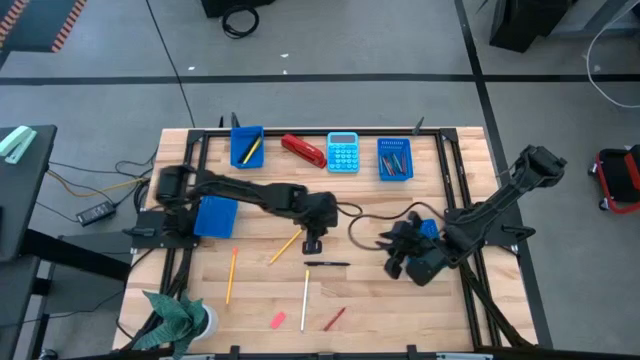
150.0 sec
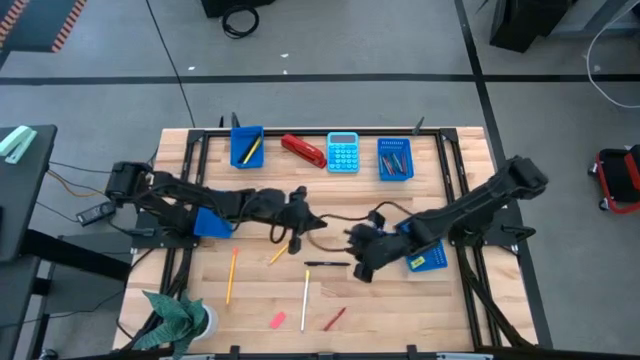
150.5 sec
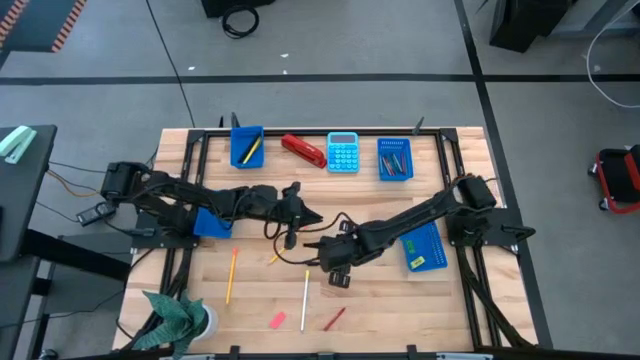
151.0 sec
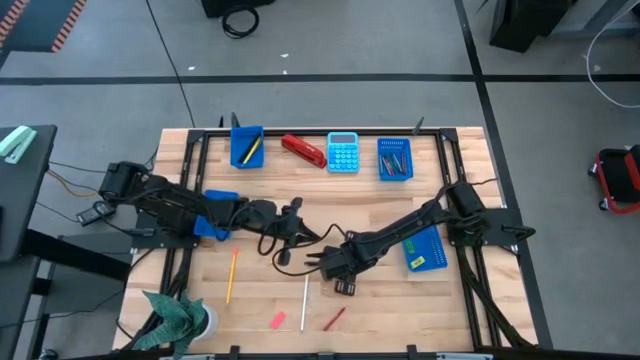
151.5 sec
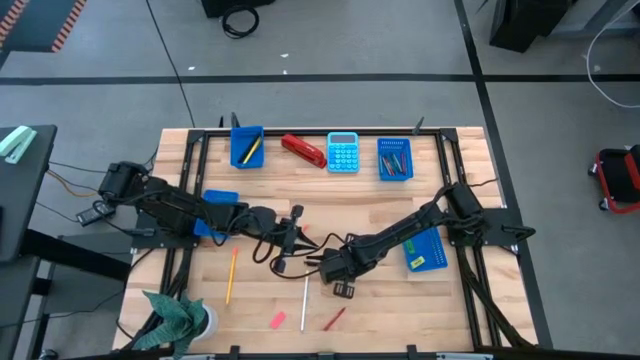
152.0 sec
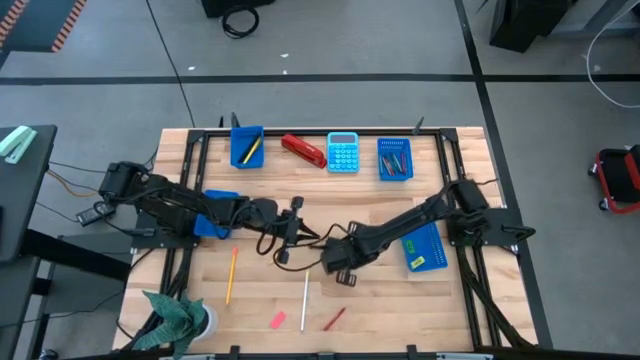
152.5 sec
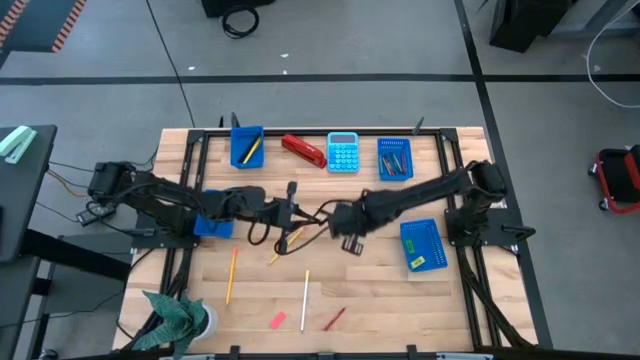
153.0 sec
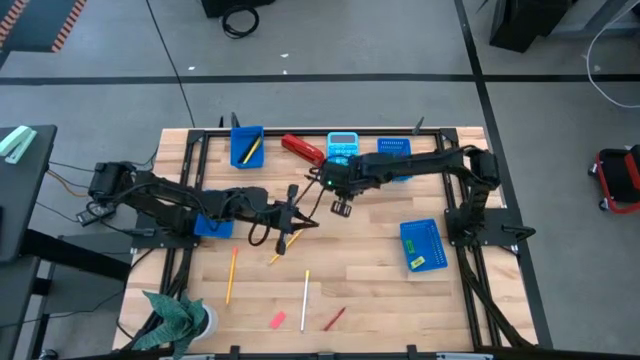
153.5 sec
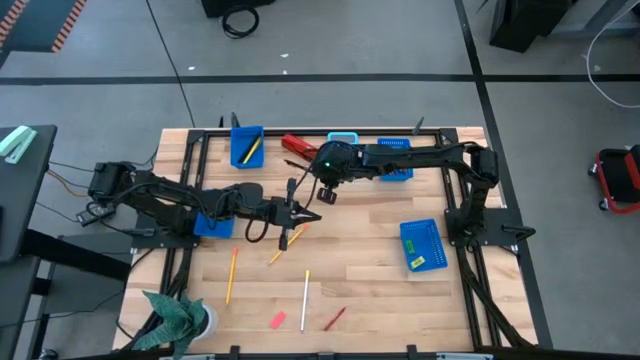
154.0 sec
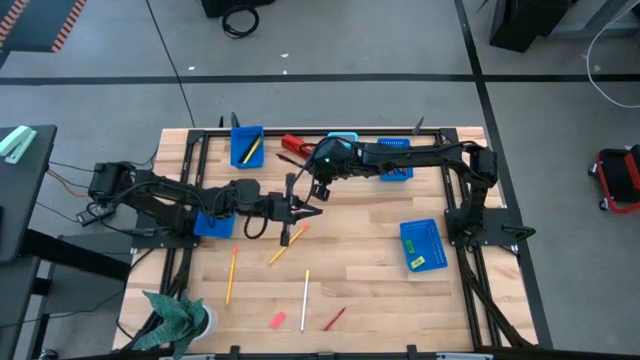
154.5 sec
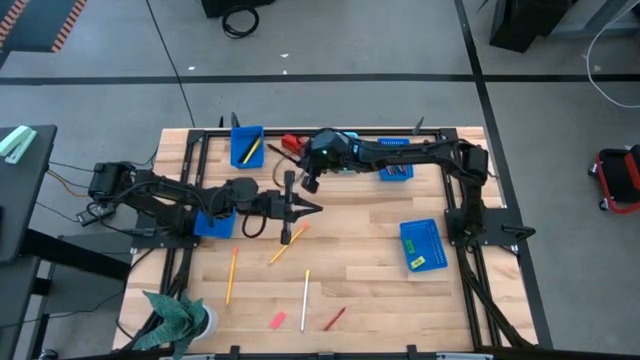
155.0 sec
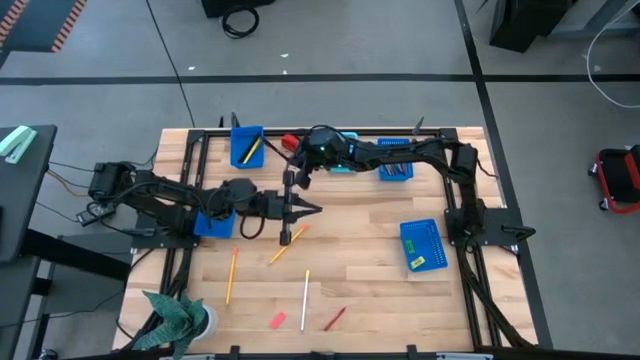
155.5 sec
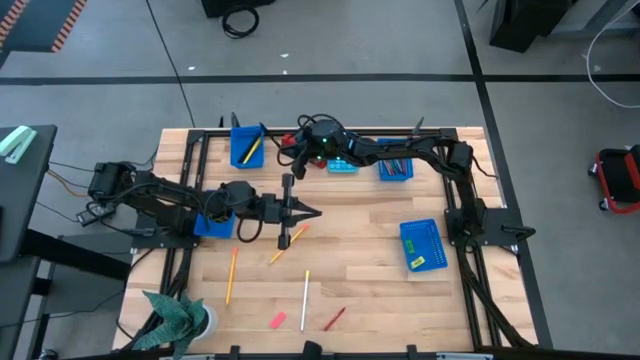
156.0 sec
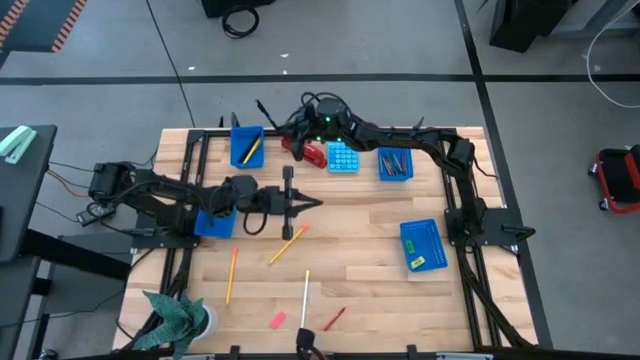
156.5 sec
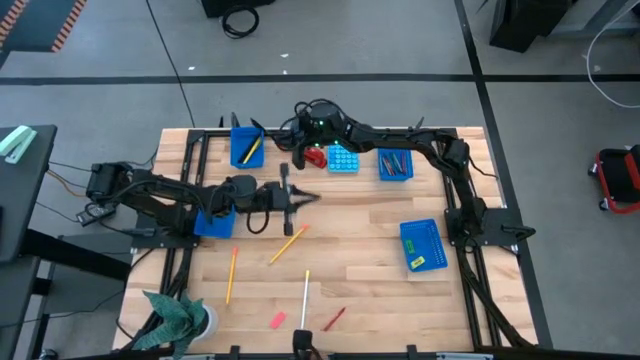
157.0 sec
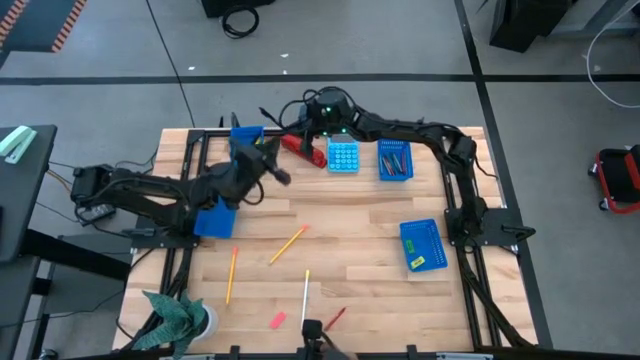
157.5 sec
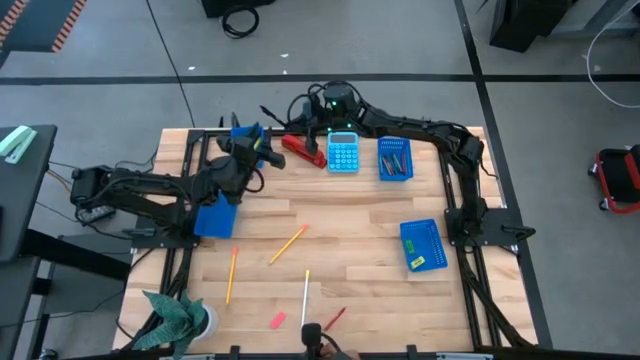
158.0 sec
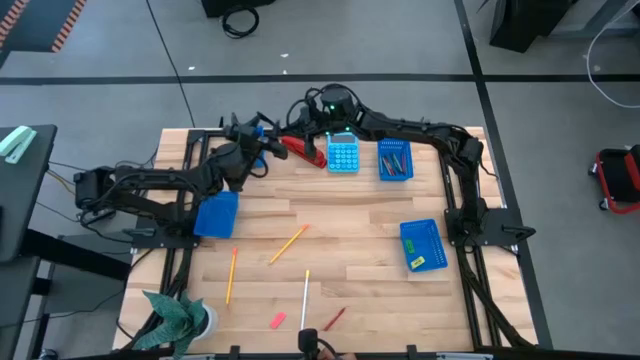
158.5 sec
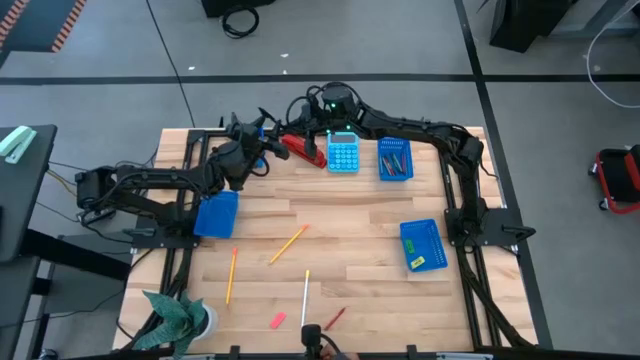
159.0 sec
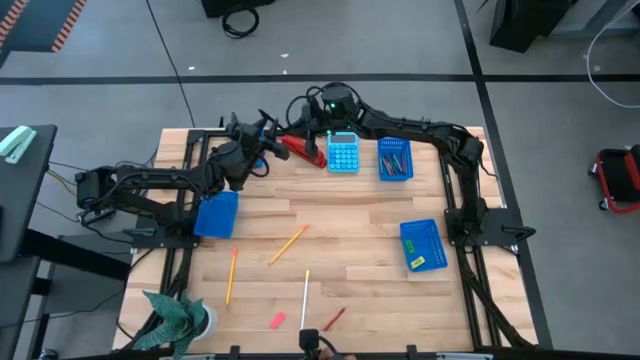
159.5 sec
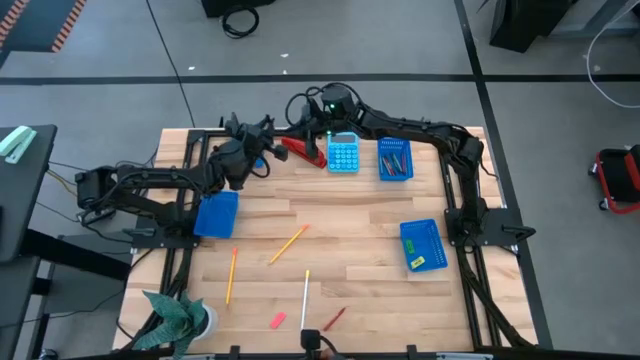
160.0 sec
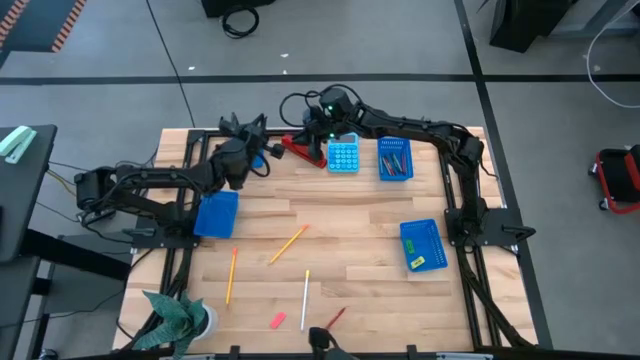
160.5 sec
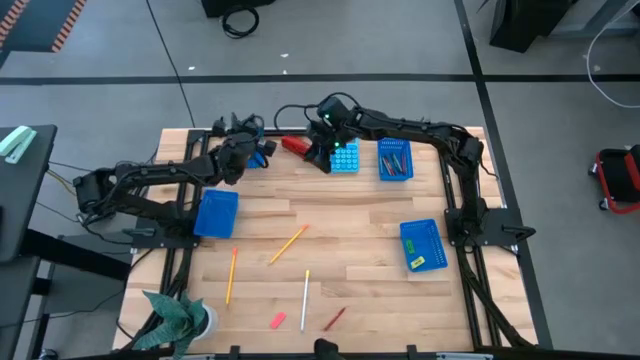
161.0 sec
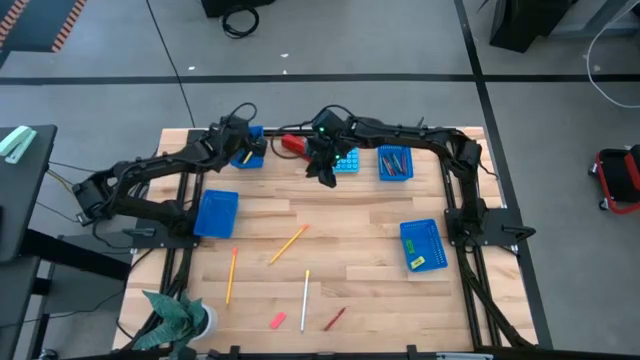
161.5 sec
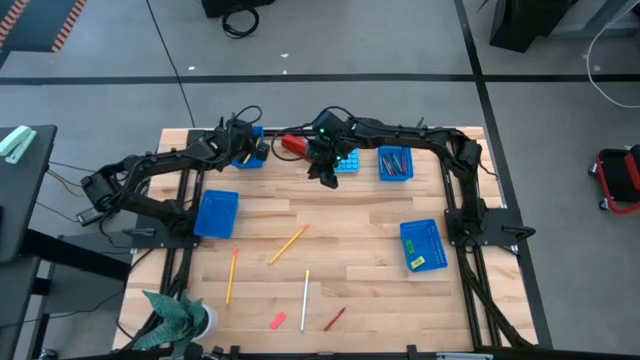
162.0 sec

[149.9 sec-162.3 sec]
Task: Sort crayons/erasers/pens/pencils in bins
Put the black pen into the top left bin

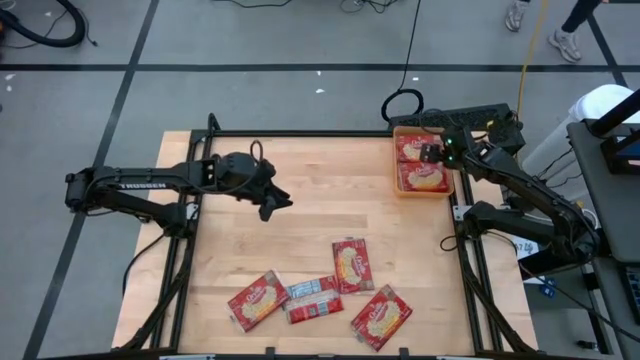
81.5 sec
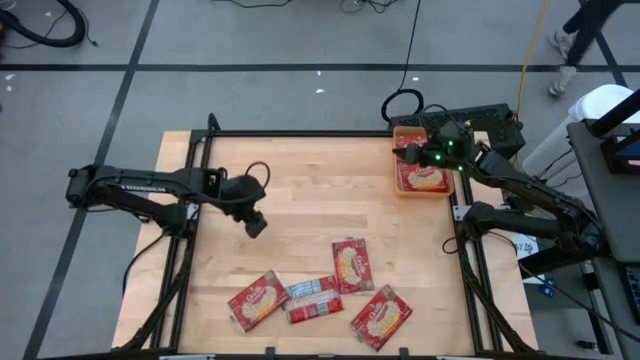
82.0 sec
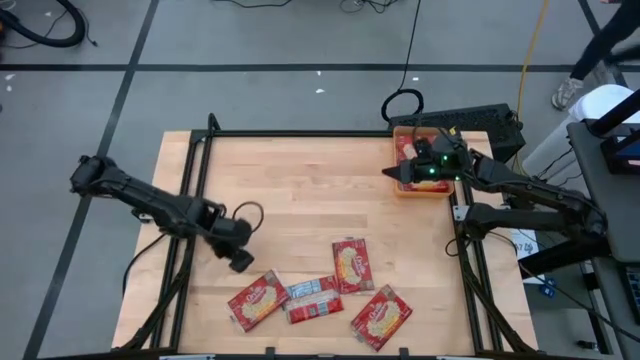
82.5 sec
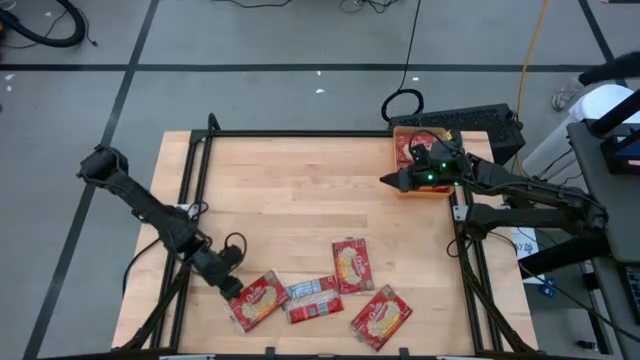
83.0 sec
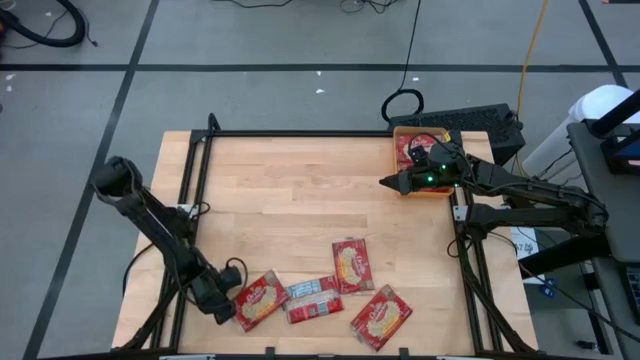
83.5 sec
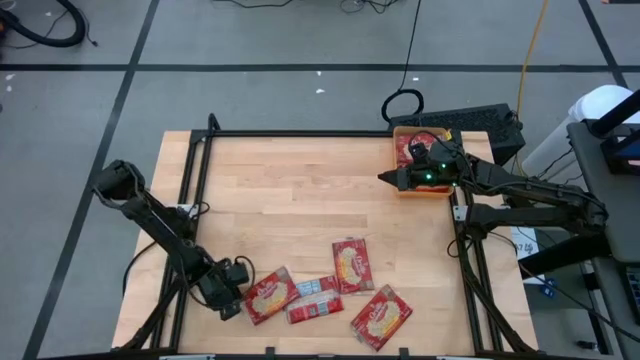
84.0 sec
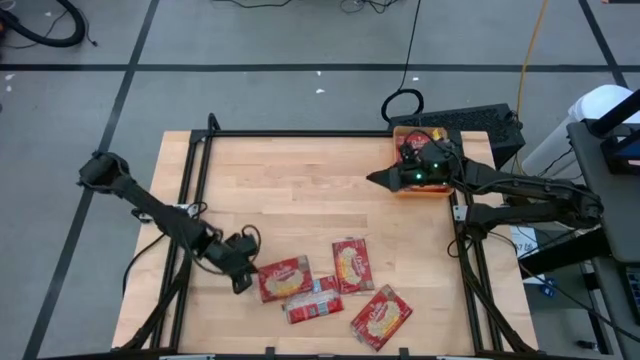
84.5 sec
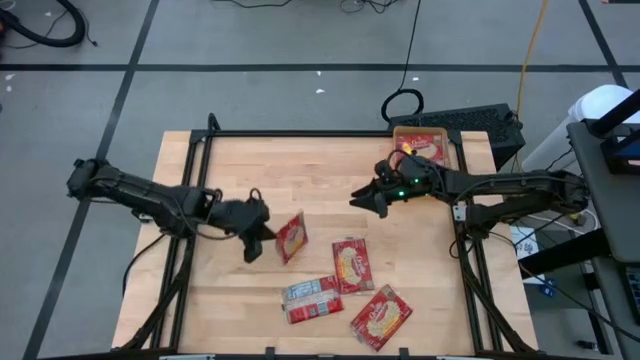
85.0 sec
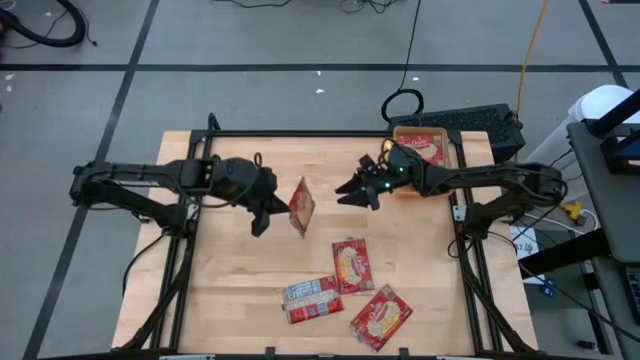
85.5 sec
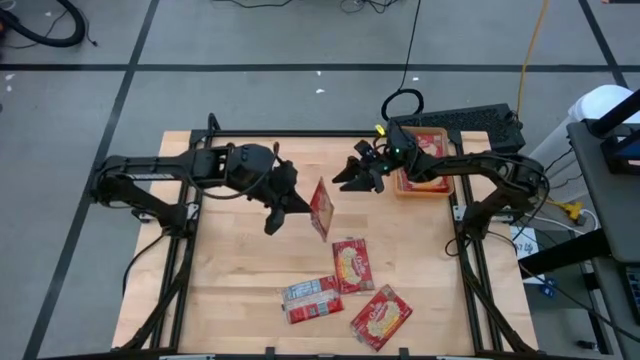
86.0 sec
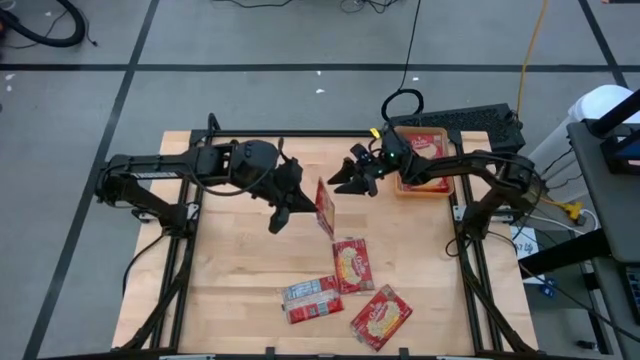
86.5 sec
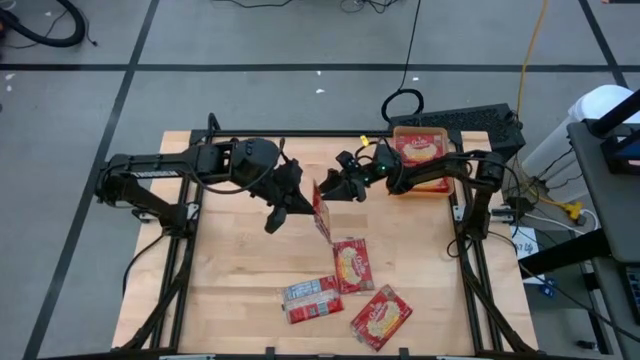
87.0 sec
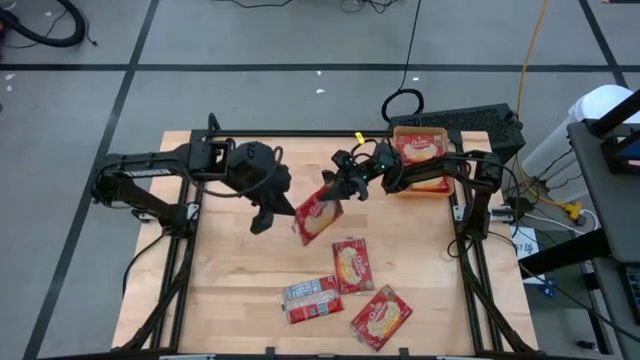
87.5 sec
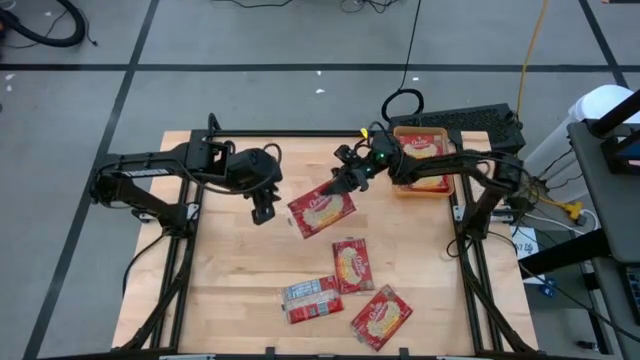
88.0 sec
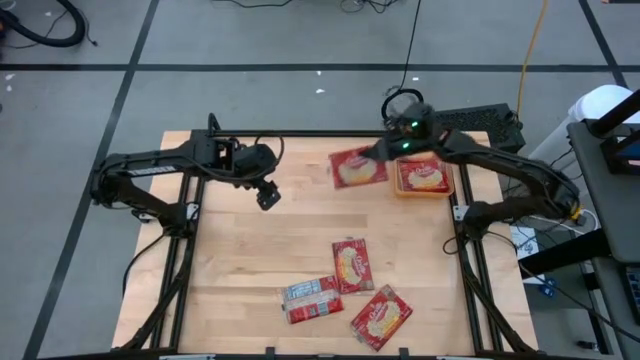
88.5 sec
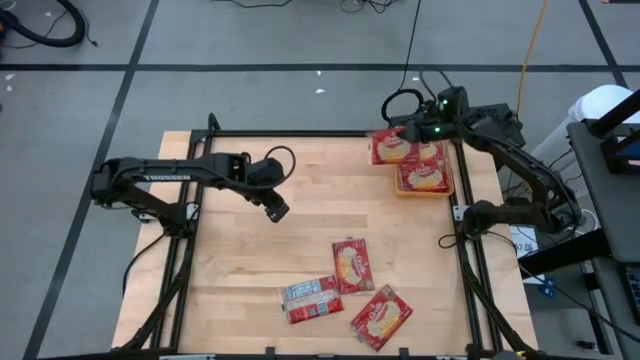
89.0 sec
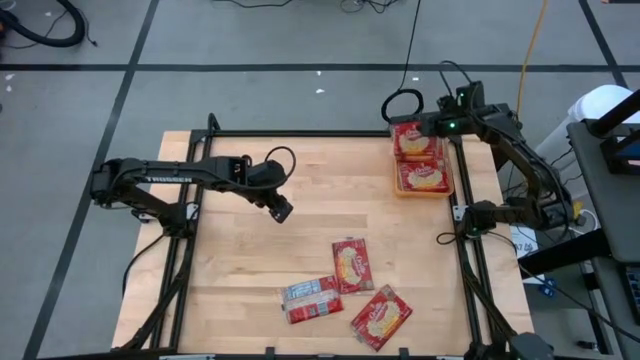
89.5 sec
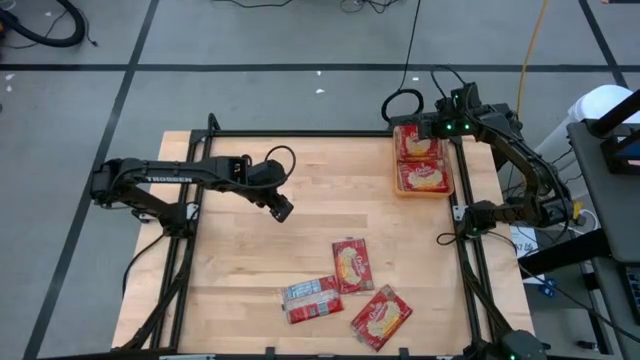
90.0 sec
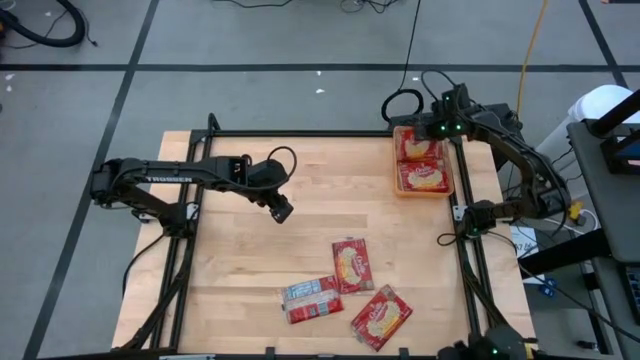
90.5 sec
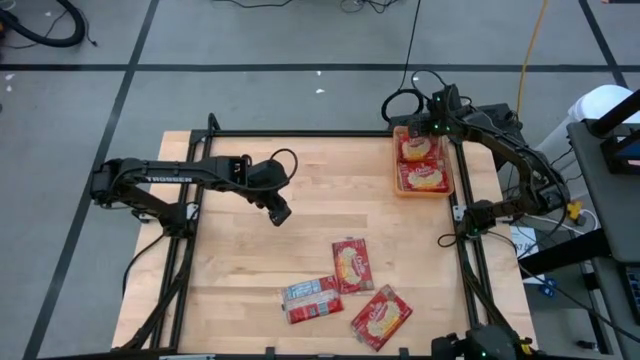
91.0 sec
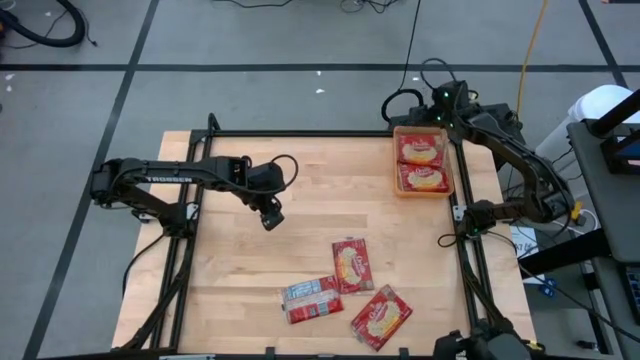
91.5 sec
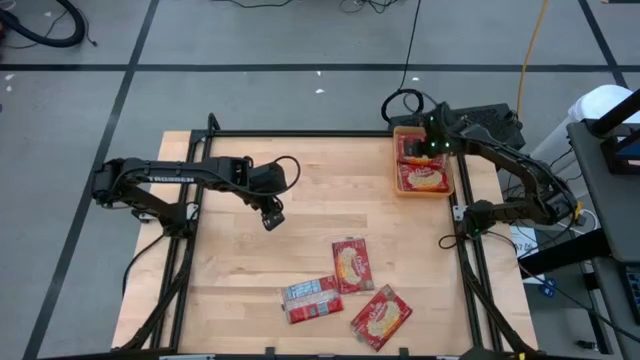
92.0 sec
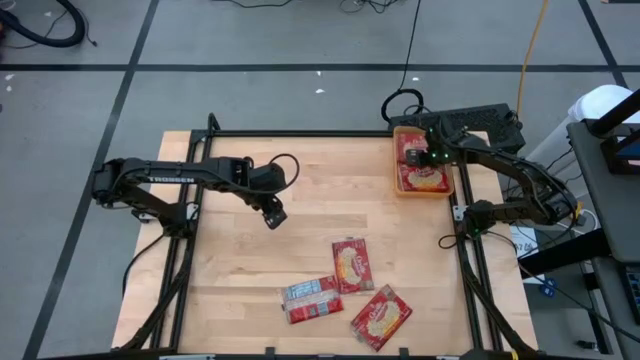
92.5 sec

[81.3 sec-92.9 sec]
Task: Sort popcorn bags into baskets
Put the red popcorn bag into the orange bin
